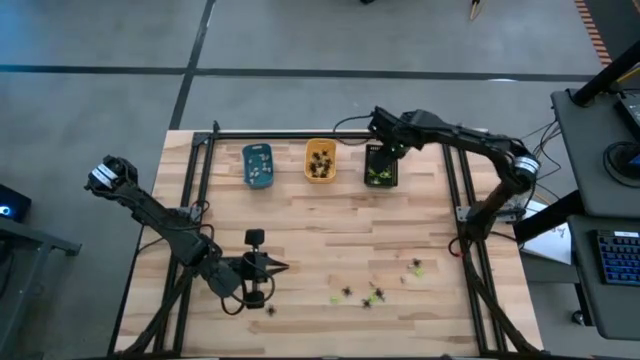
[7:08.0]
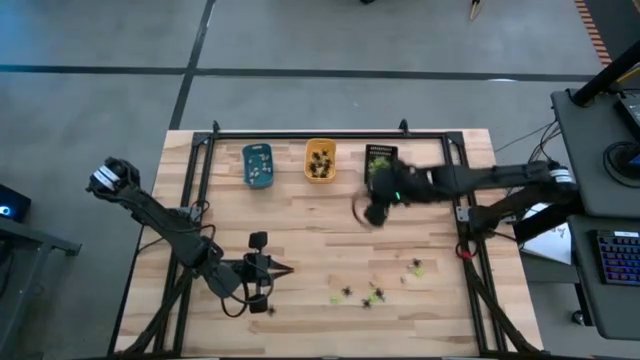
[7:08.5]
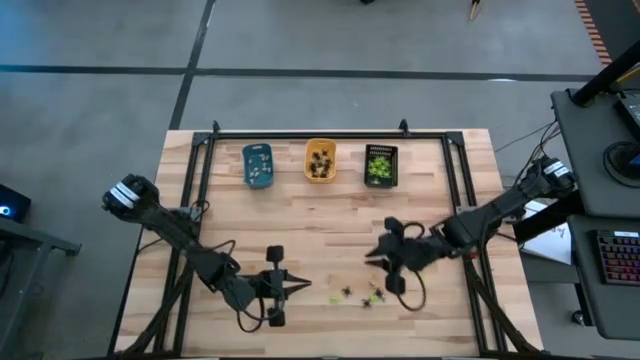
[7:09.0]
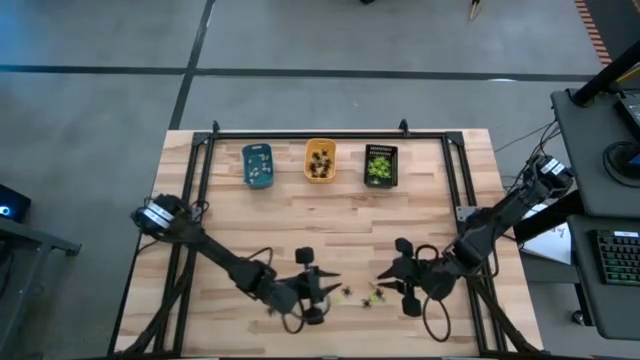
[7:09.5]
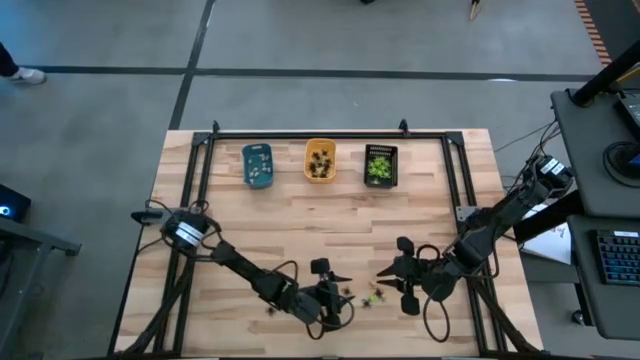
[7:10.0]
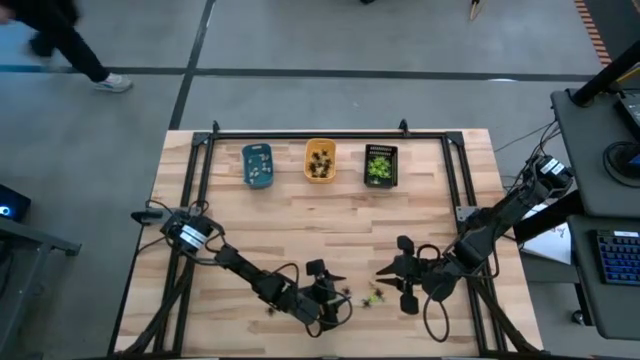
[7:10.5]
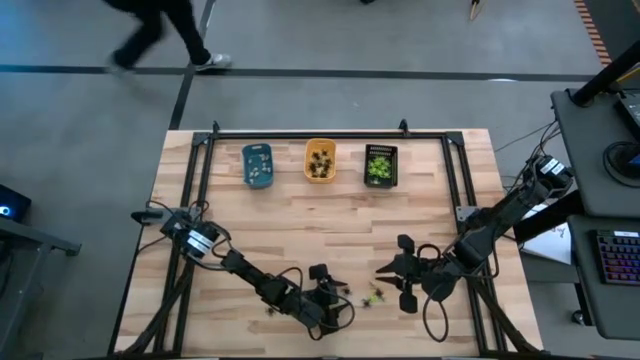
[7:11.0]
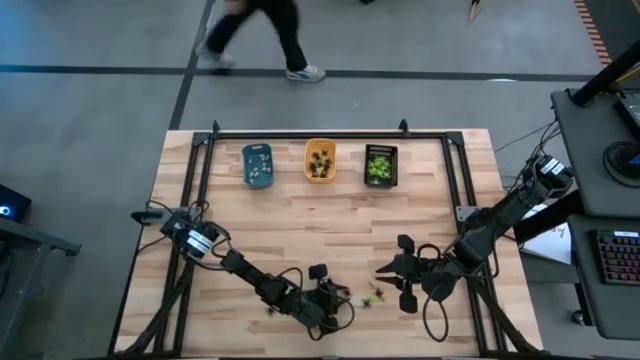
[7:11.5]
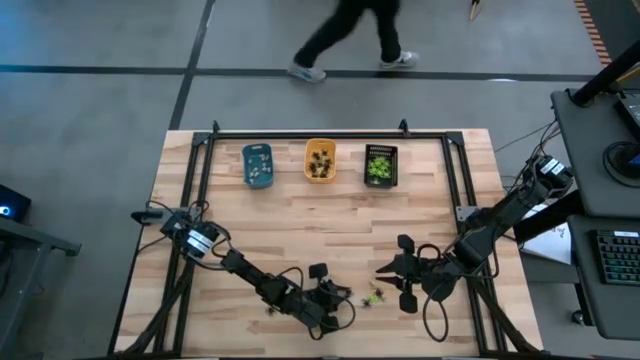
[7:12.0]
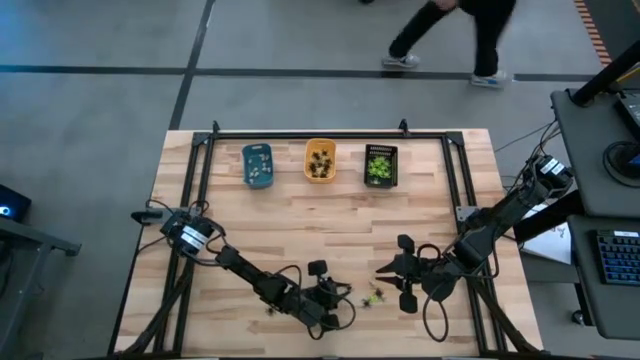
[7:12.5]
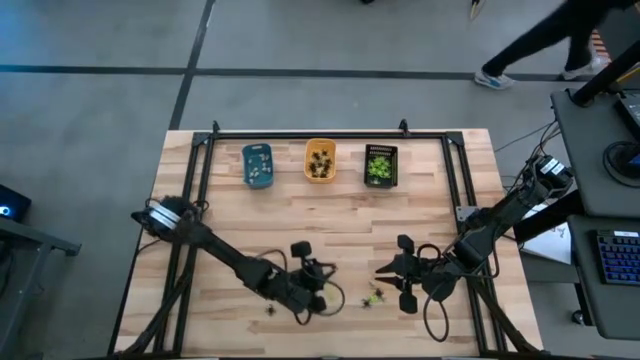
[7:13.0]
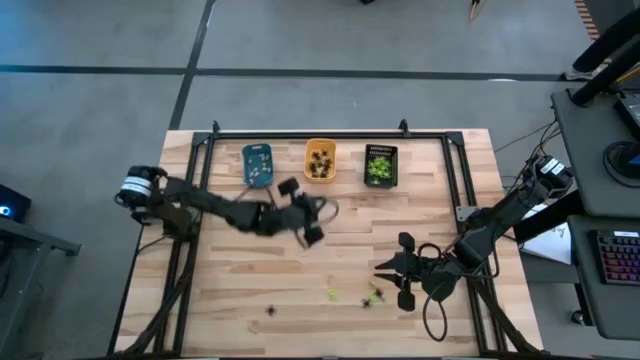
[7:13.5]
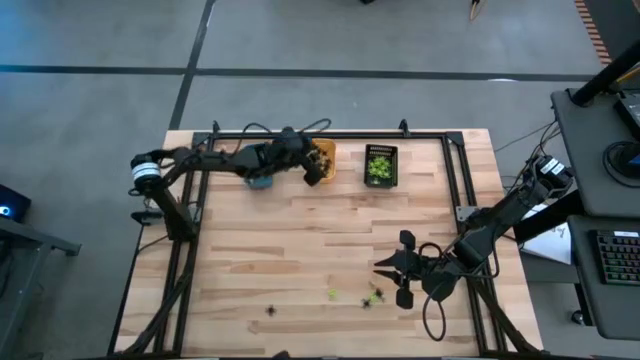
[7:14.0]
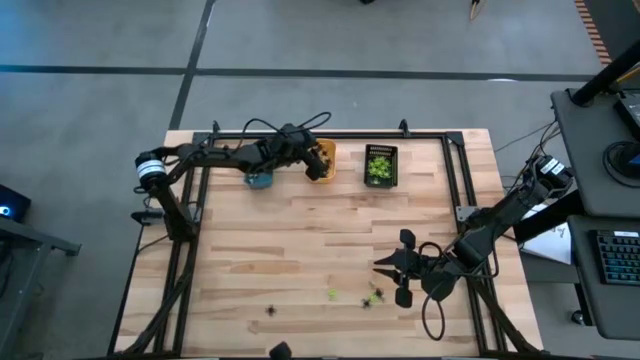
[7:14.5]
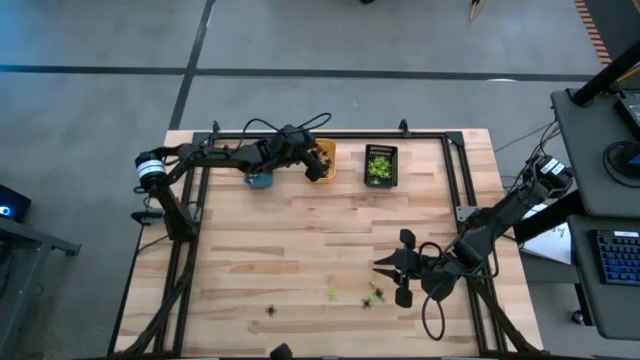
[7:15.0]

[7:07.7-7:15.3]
Task: Sort Halloween decoration
Put the black spider toy into the orange bin

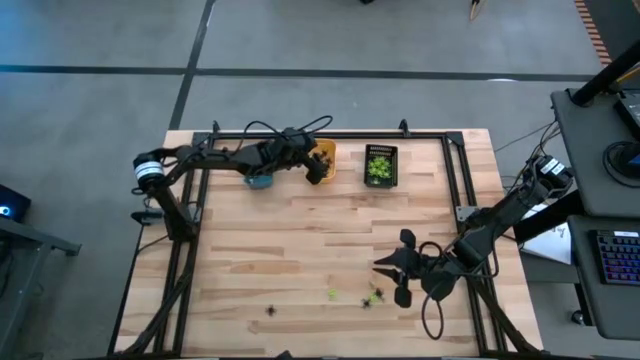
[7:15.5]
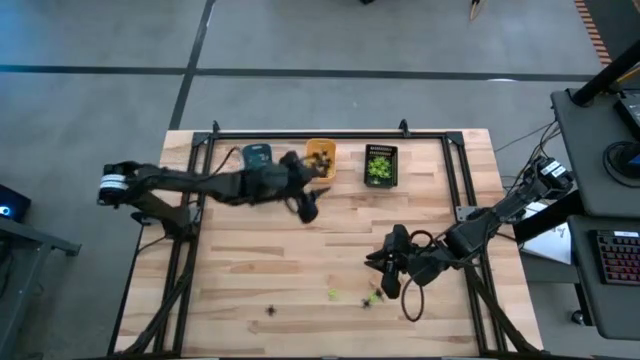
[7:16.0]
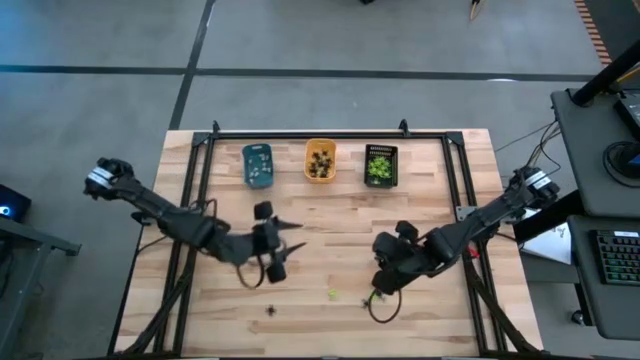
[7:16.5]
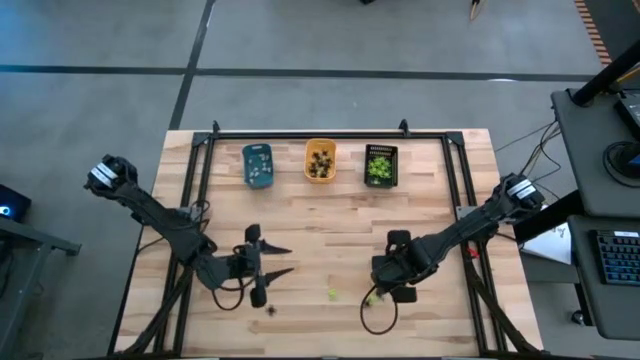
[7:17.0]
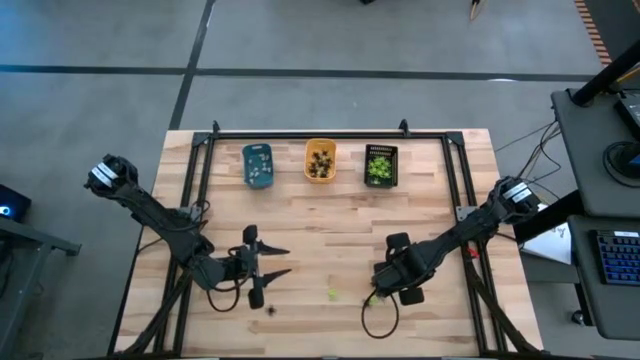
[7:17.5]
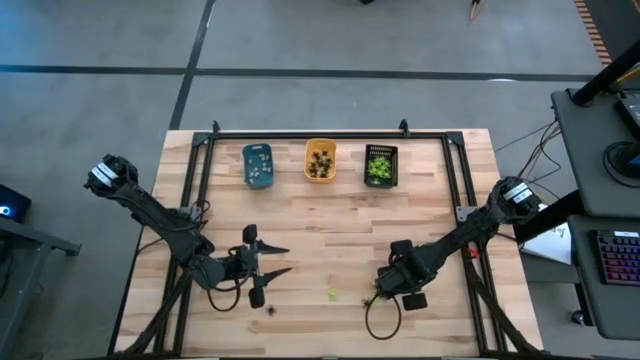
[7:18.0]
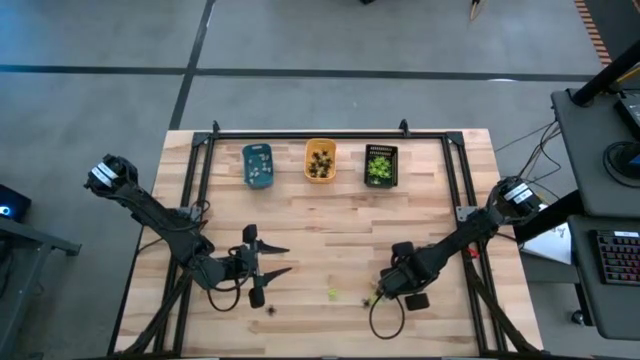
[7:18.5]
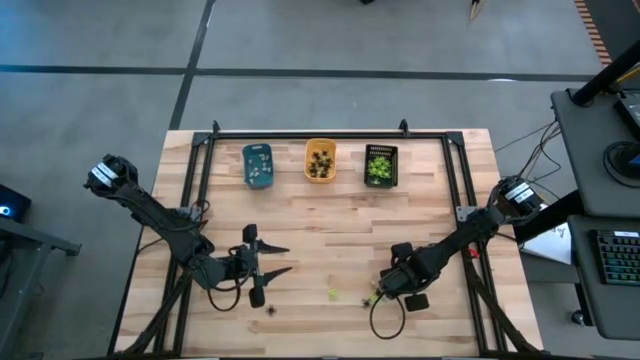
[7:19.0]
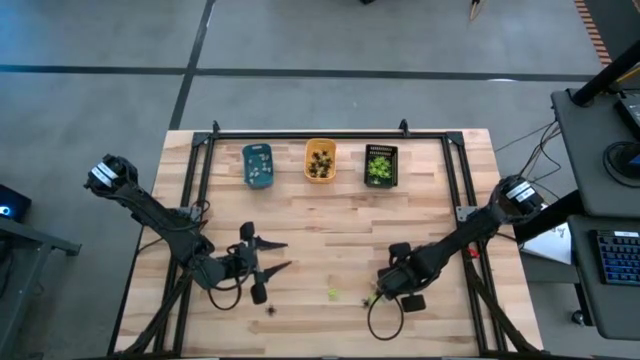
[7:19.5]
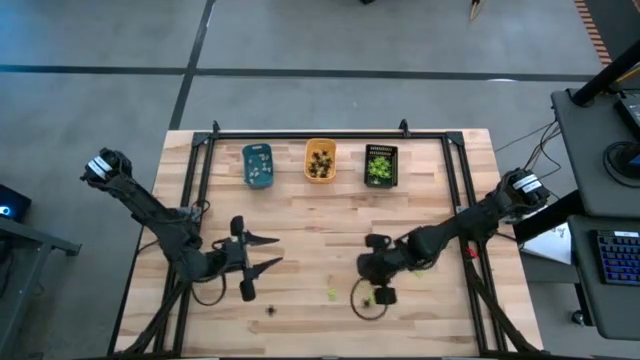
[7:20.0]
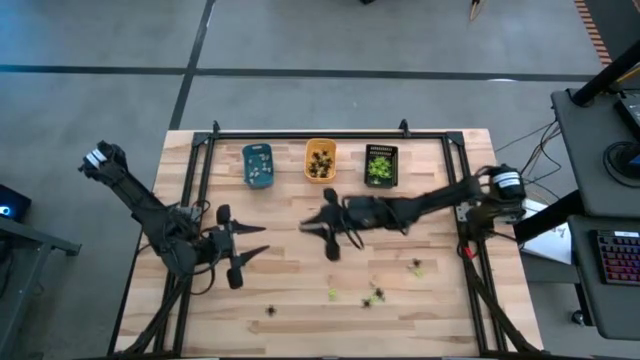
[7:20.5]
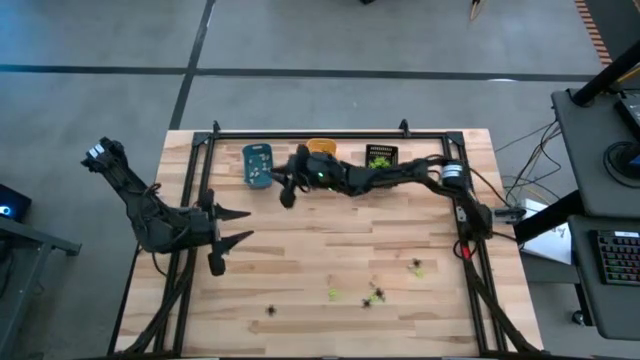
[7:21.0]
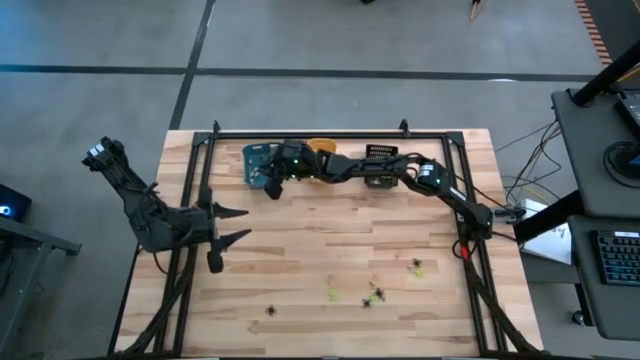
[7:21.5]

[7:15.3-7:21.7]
Put the white skull toy into the blue bin

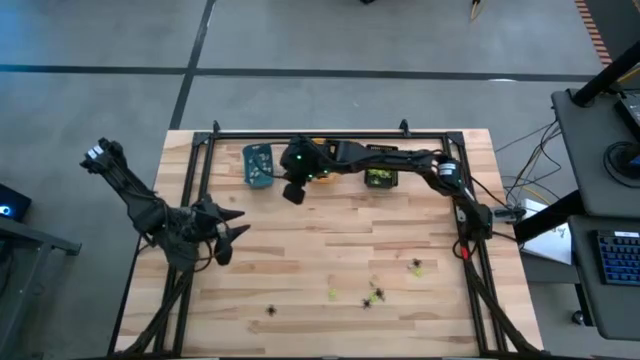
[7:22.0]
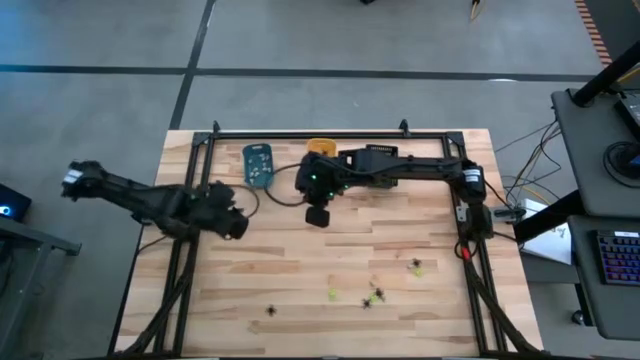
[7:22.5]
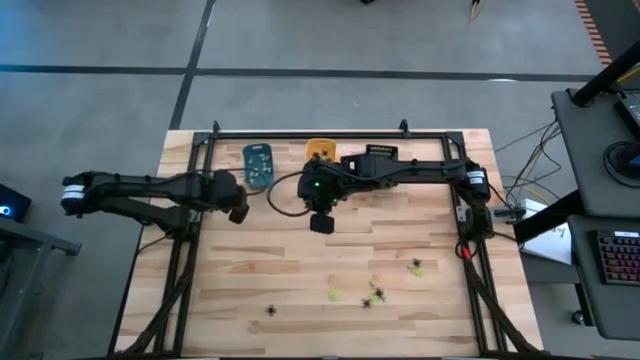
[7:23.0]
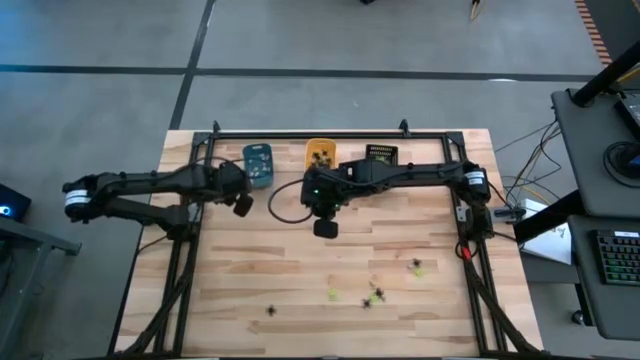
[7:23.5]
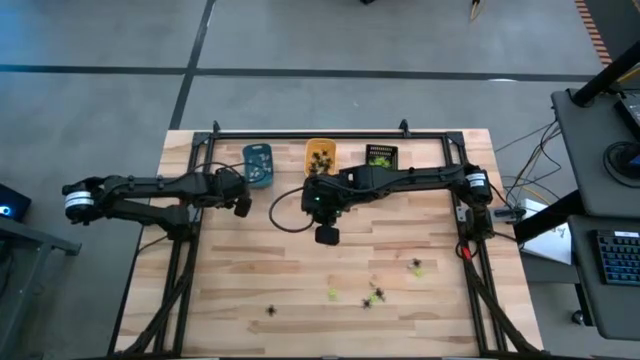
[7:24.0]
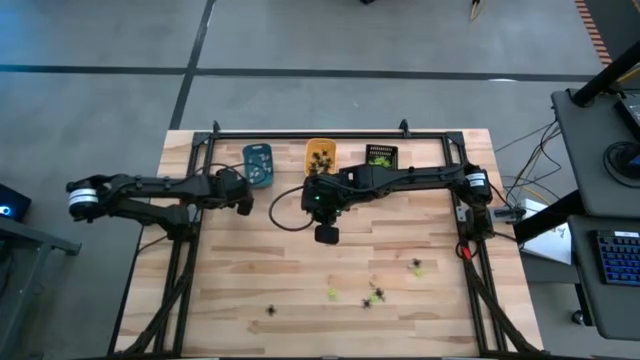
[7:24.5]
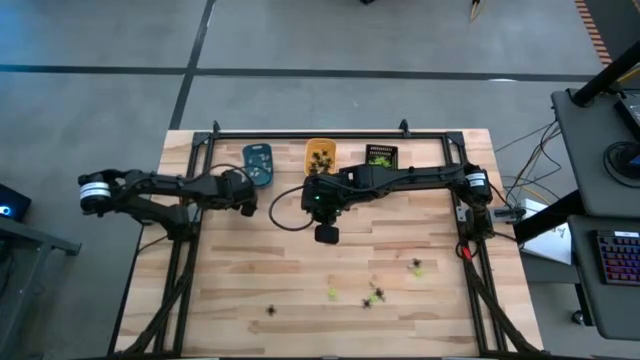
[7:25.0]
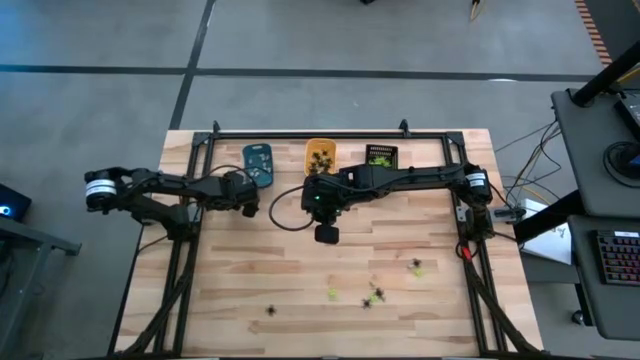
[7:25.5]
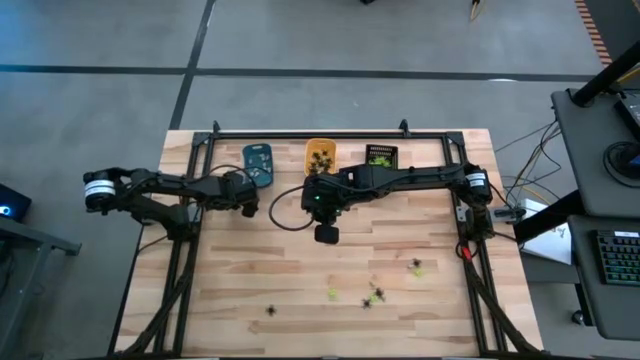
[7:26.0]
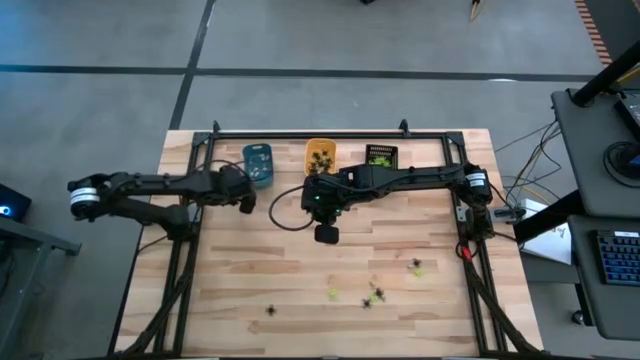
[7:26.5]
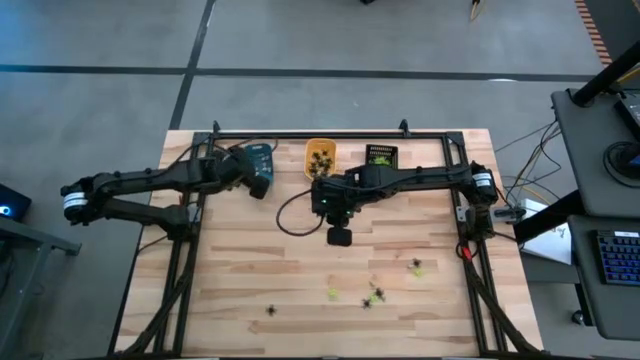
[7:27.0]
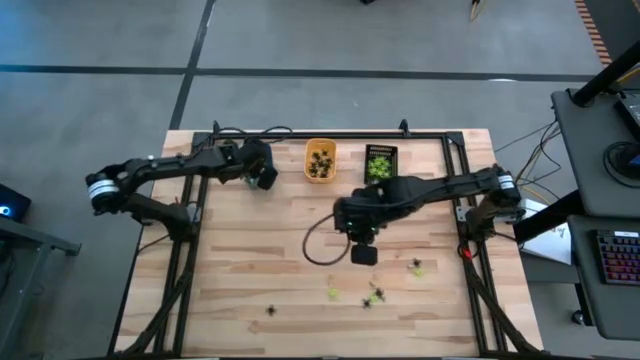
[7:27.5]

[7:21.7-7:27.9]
Put the white skull toy into the blue bin
